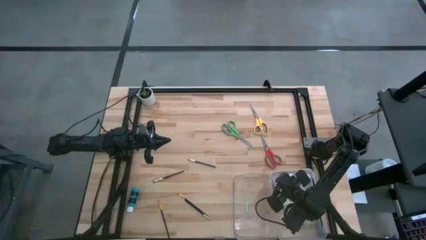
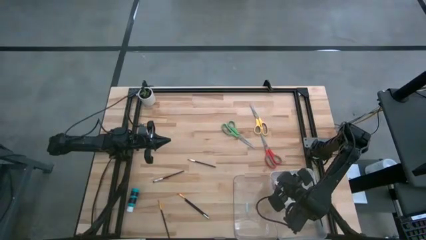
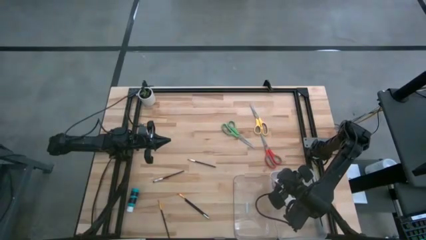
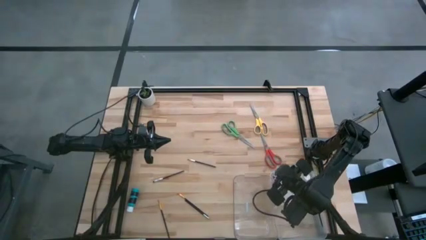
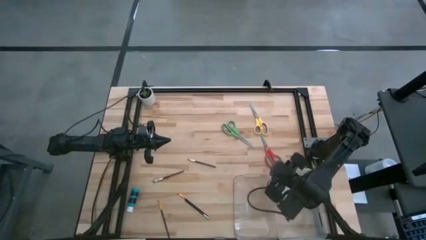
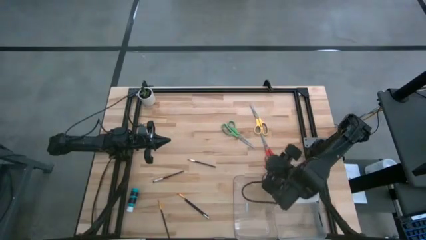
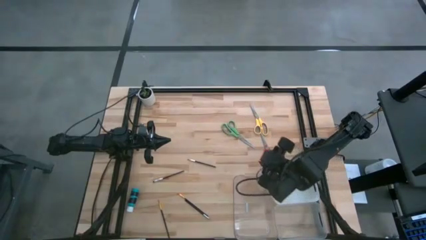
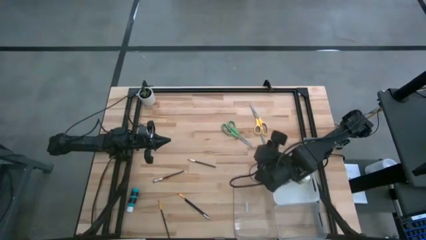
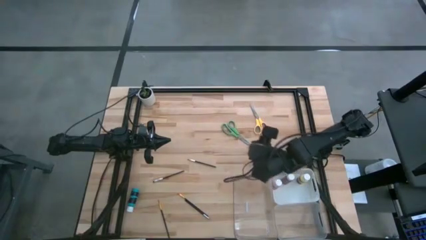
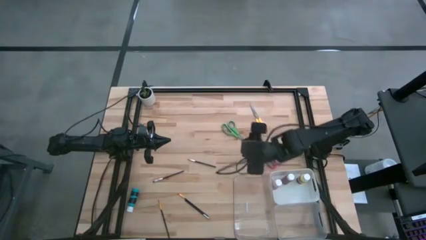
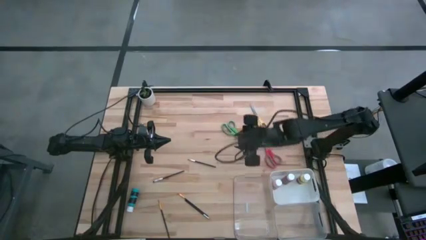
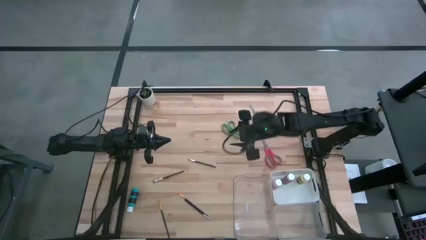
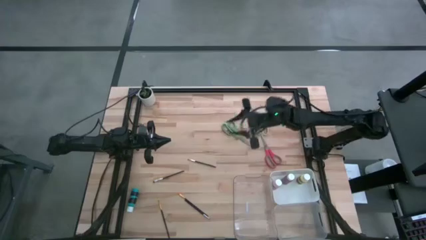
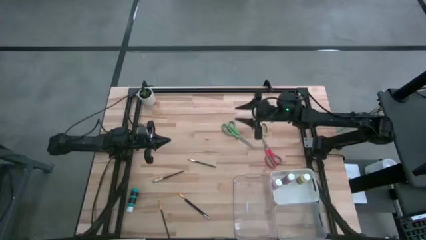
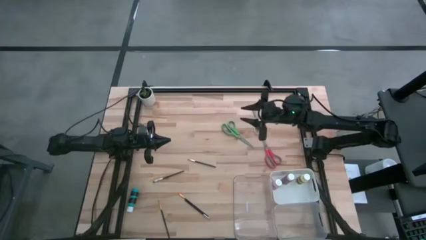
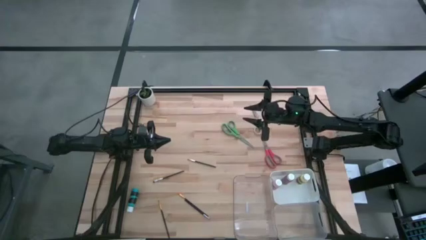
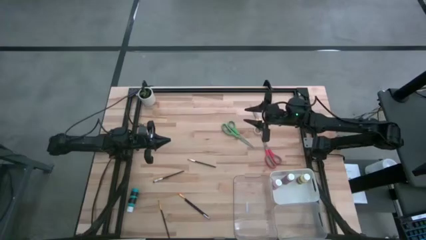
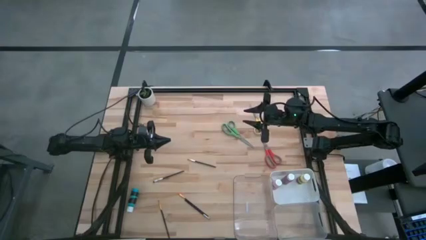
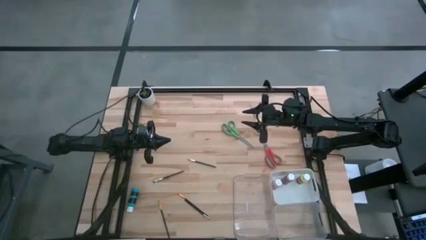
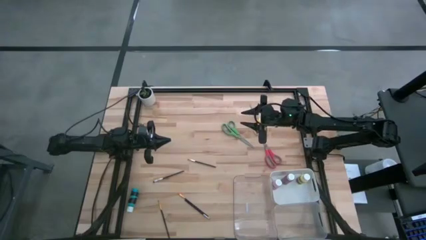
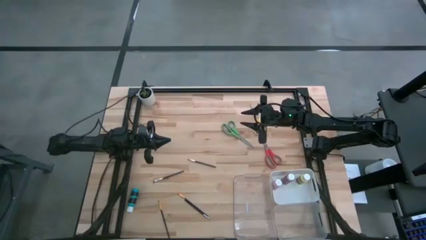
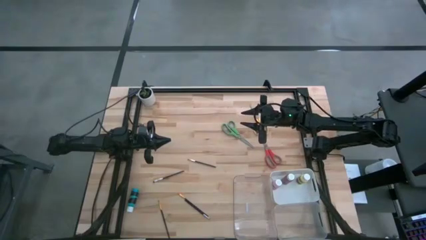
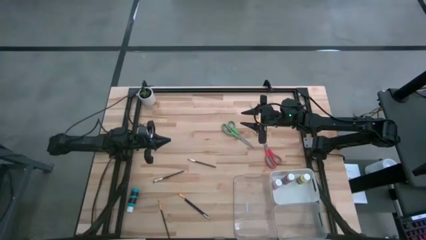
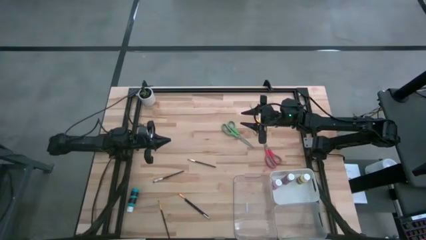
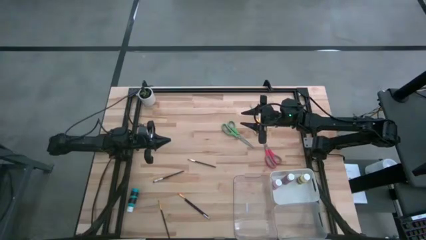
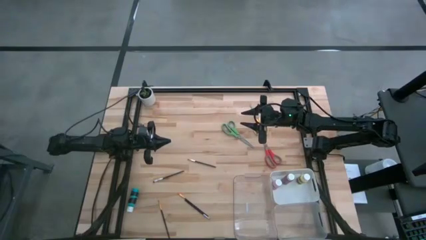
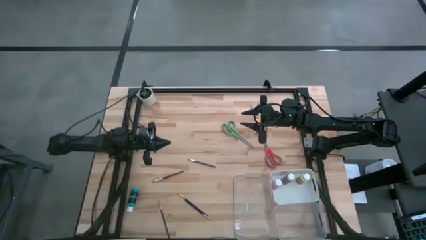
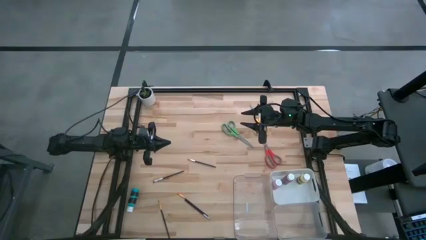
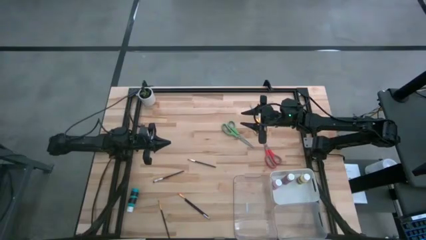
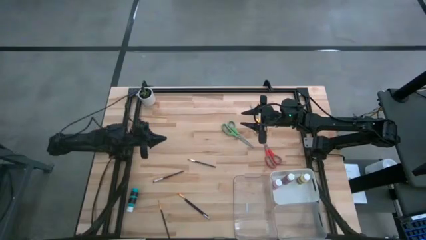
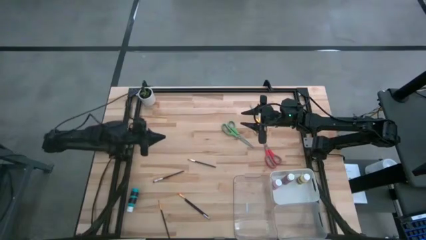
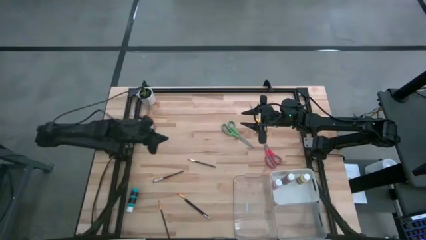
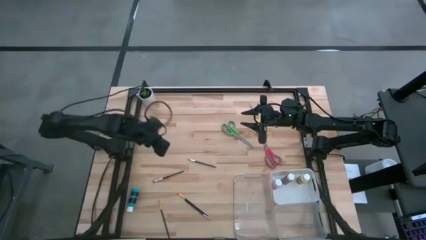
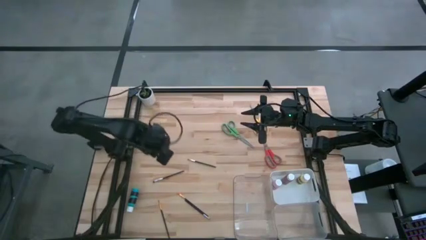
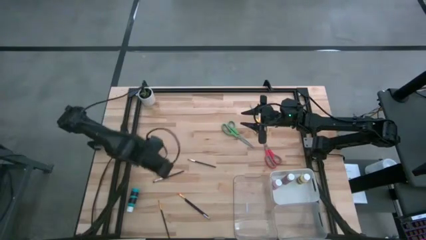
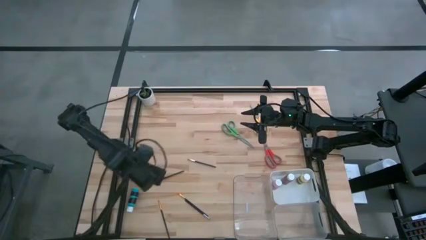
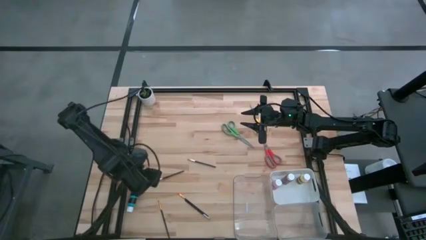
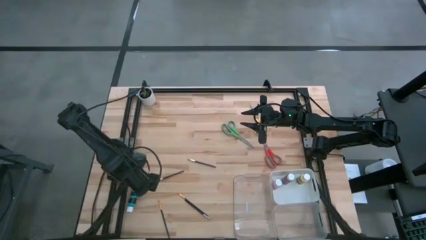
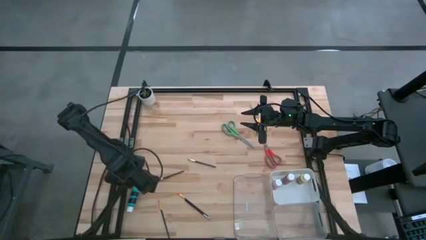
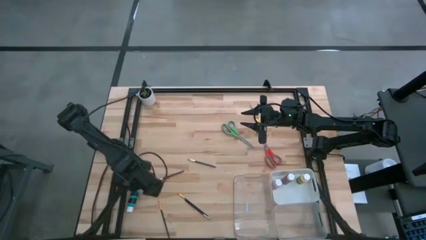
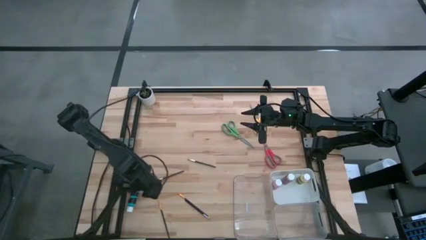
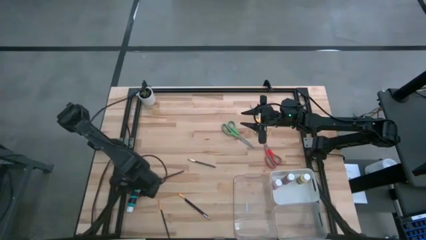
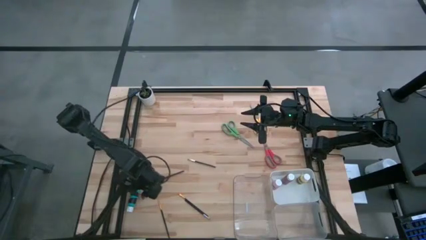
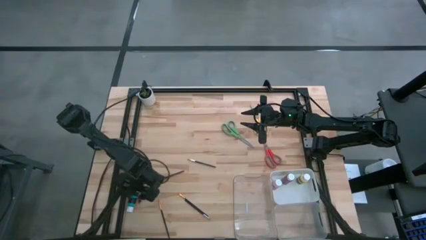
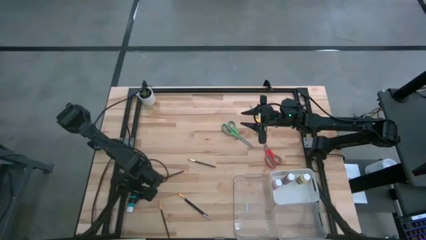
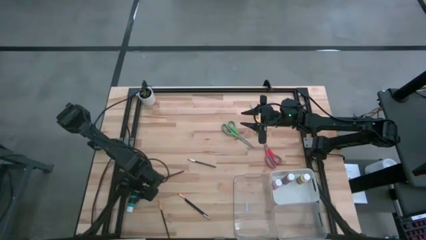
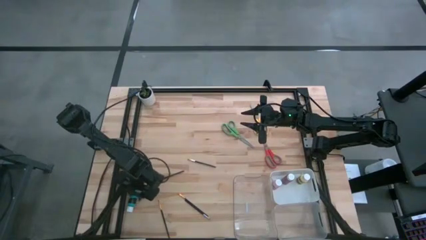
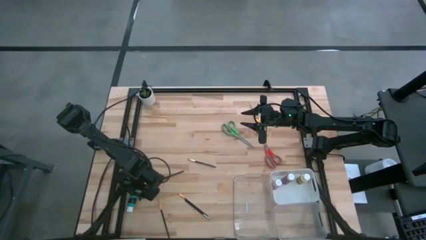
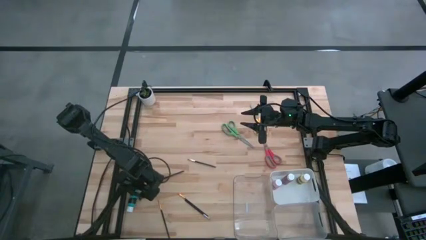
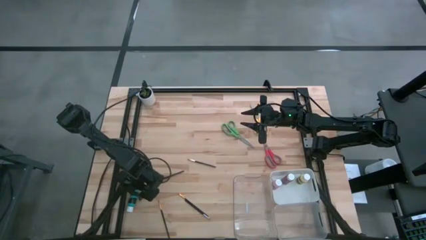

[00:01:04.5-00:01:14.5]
Task: Pick & Place Paint Supplies
Put the blue paint bottle into the white bin

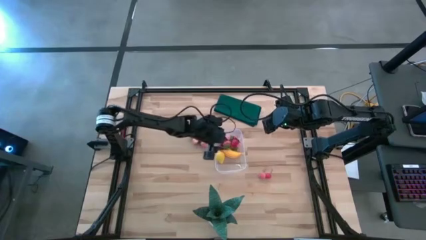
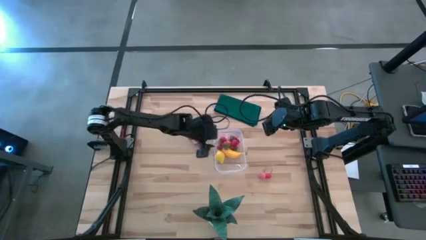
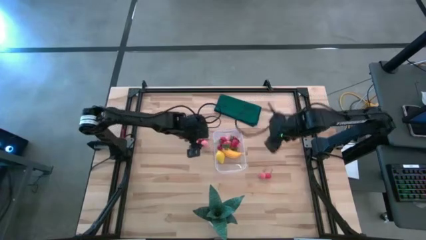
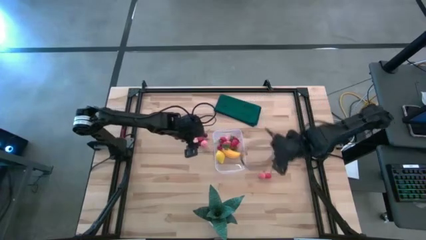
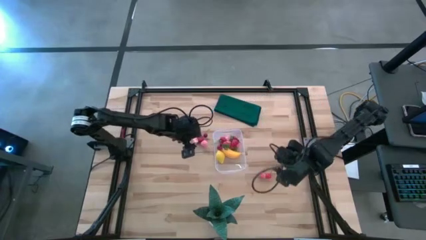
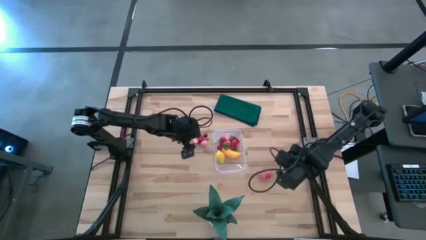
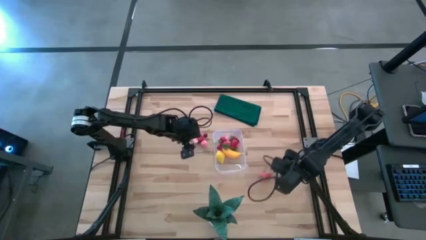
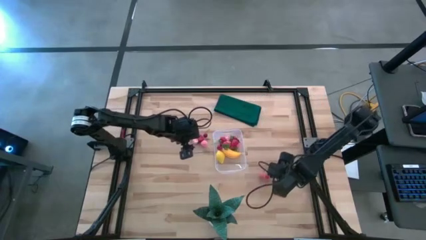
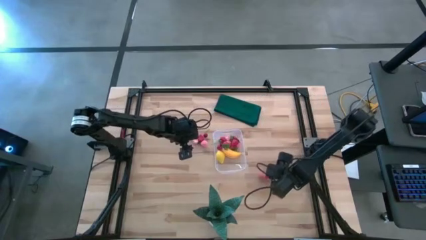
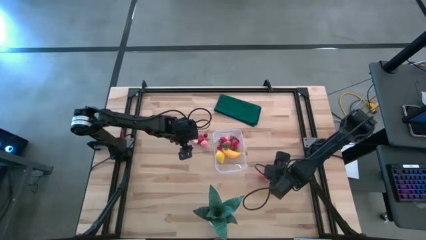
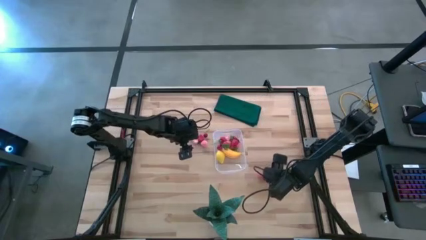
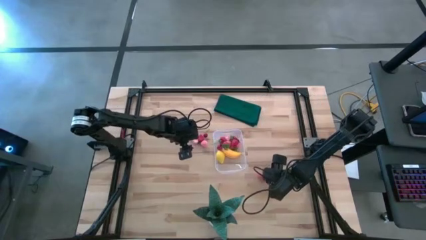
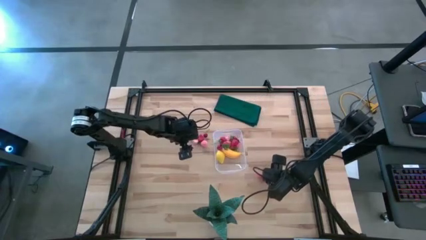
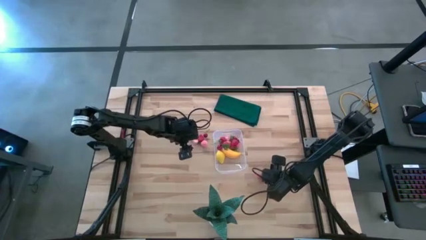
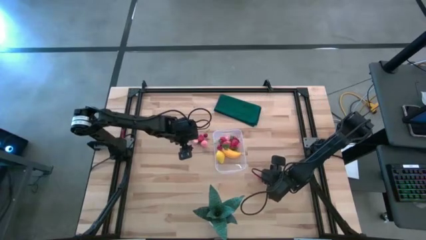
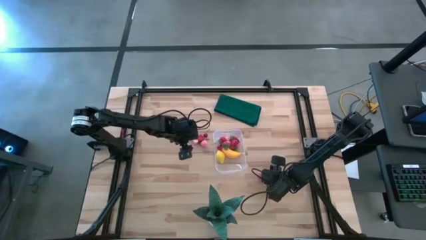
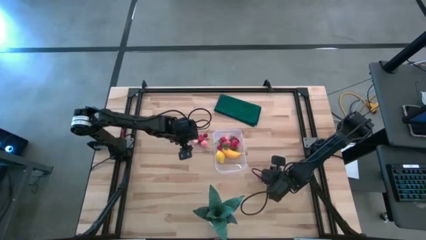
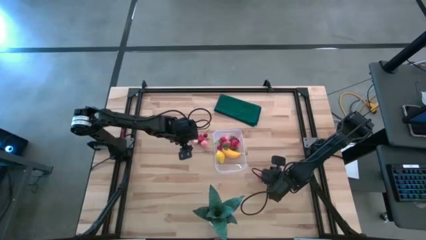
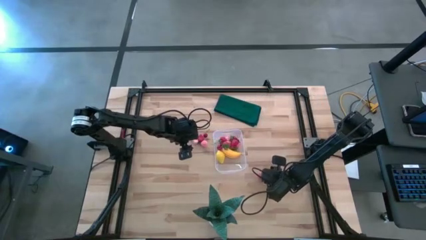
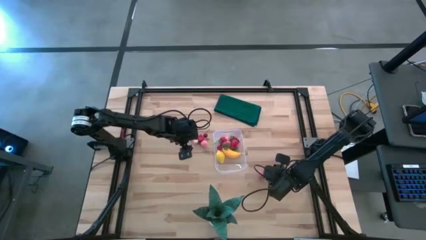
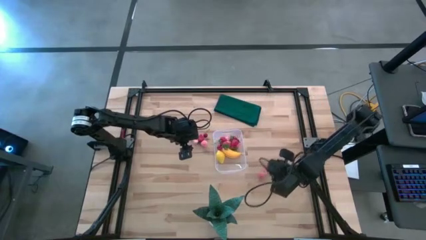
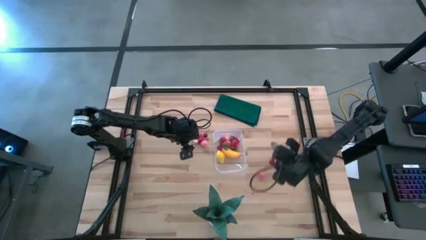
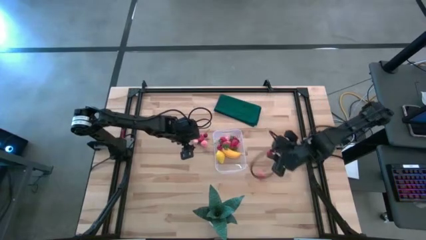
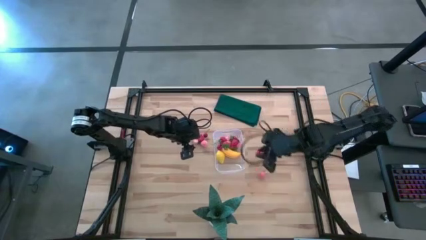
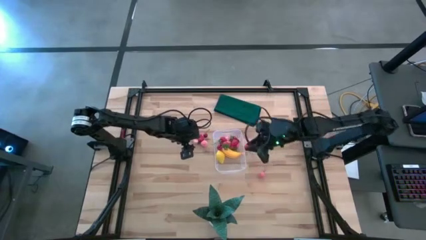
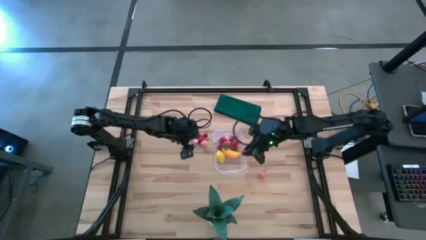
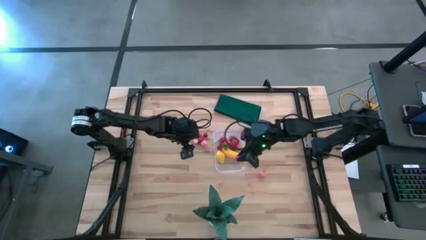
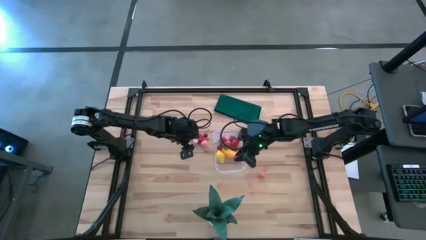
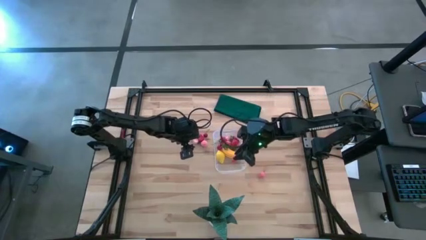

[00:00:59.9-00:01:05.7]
Task: Pick and placing Produce into tupperware
Put the cherry into the transparent bin

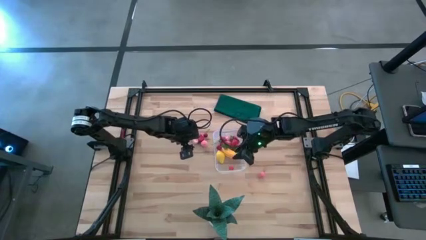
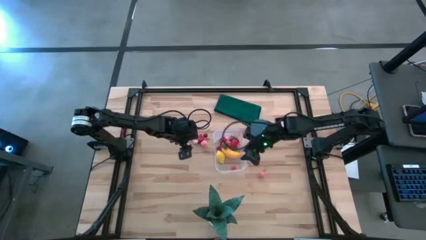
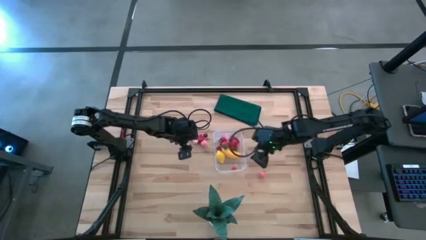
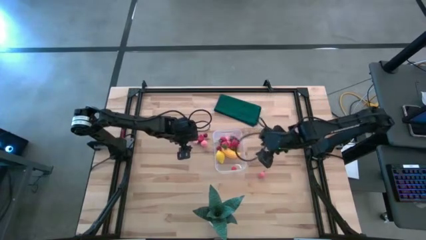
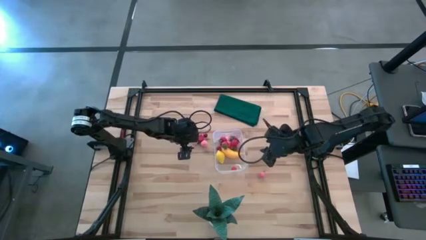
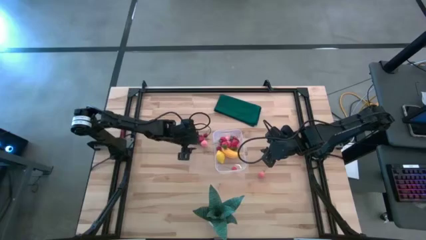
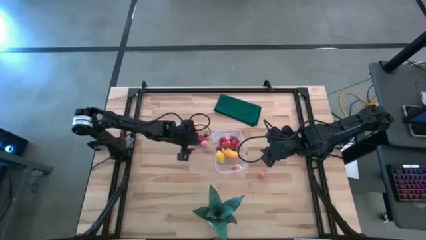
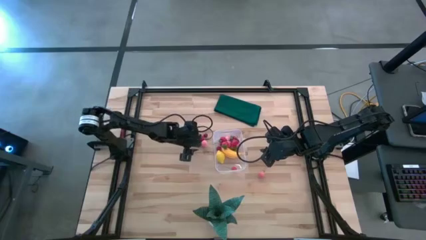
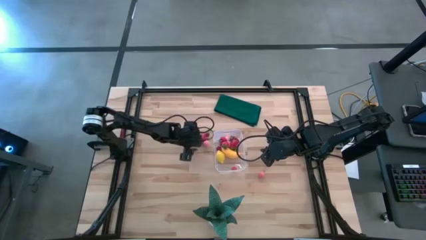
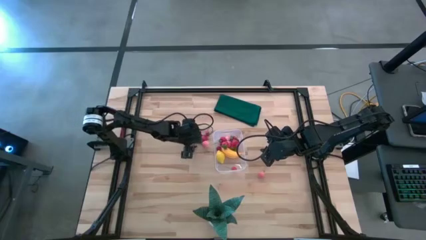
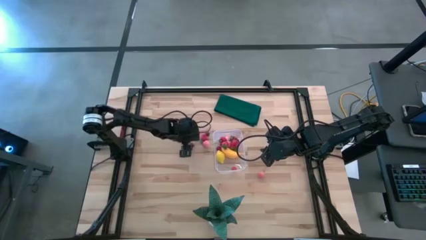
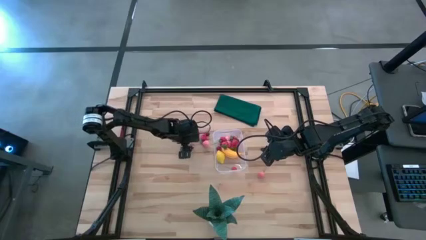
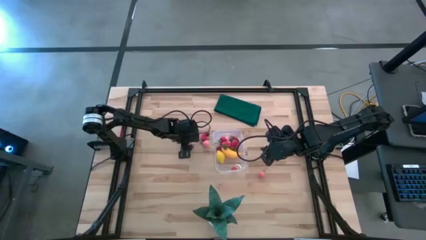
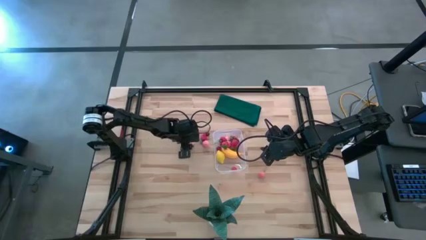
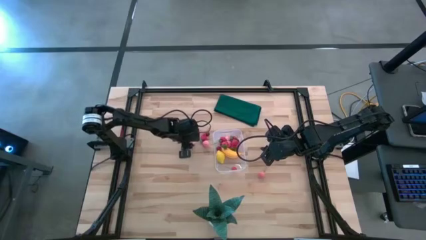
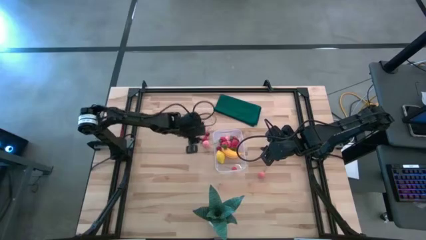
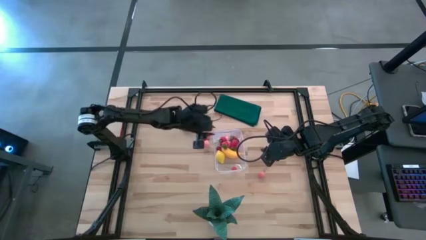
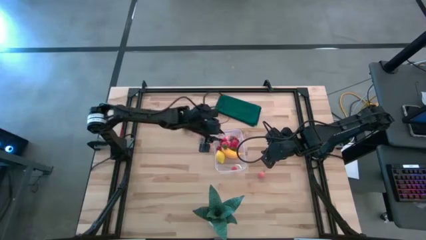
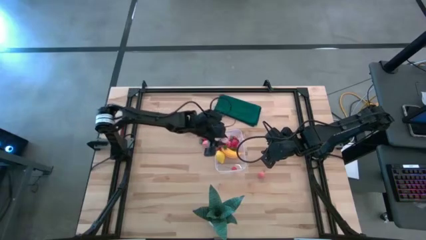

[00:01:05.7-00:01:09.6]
Put the peach into the transparent bin
